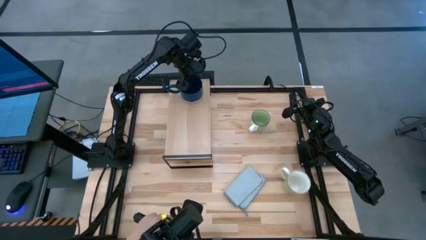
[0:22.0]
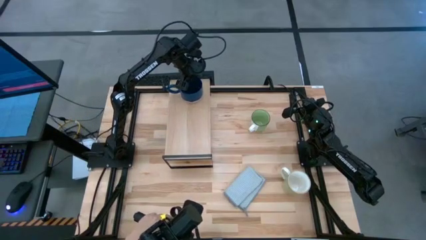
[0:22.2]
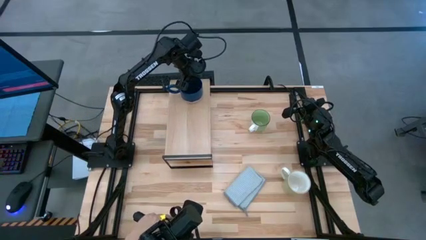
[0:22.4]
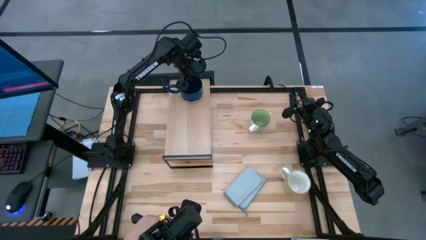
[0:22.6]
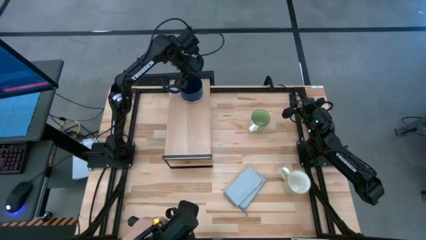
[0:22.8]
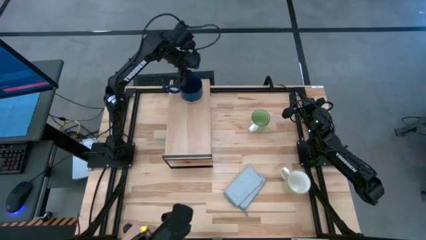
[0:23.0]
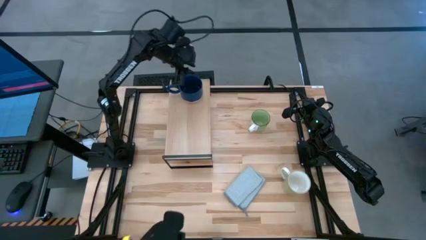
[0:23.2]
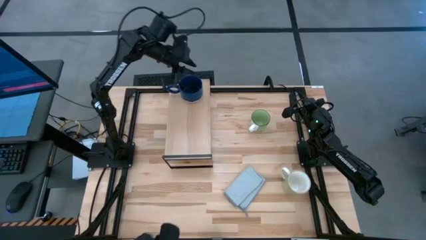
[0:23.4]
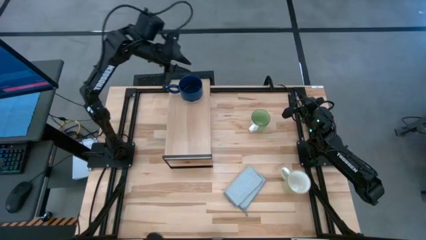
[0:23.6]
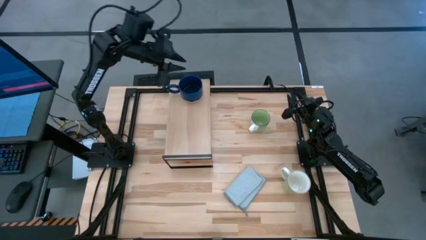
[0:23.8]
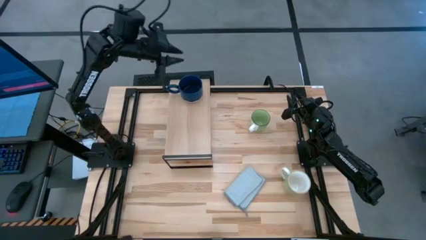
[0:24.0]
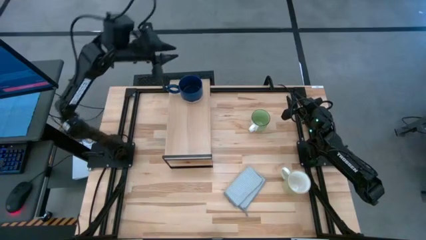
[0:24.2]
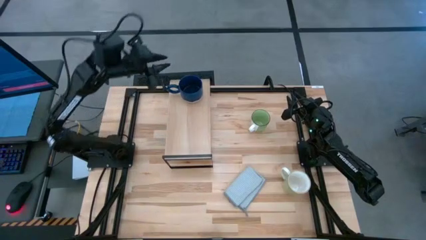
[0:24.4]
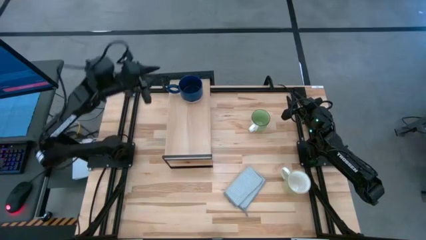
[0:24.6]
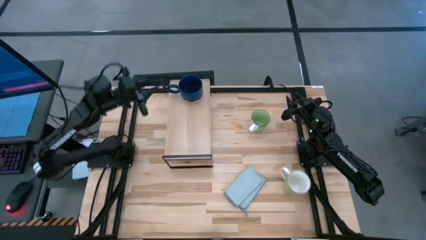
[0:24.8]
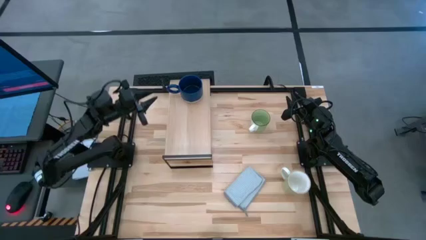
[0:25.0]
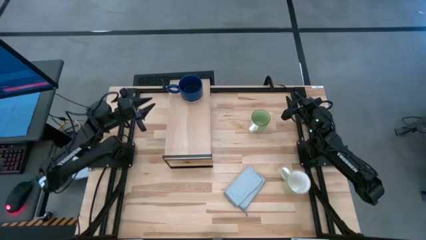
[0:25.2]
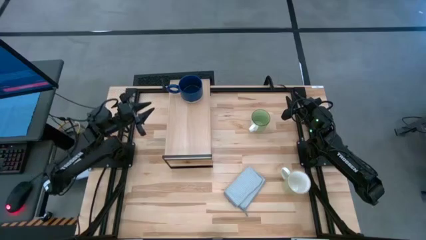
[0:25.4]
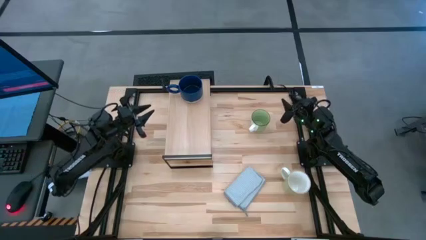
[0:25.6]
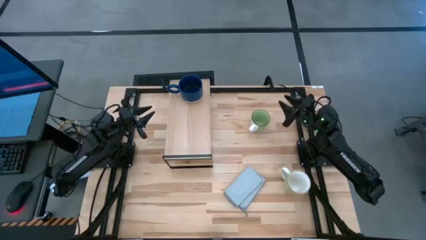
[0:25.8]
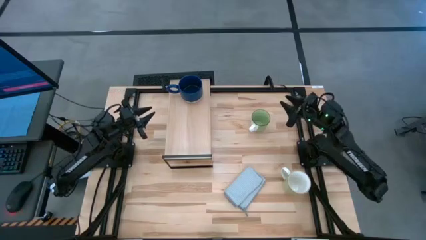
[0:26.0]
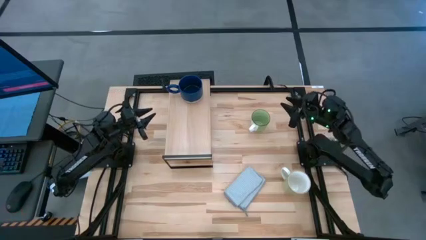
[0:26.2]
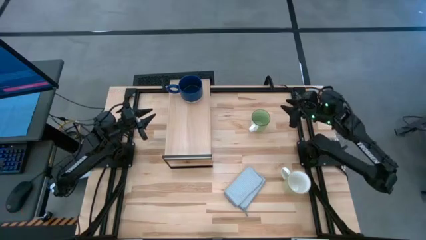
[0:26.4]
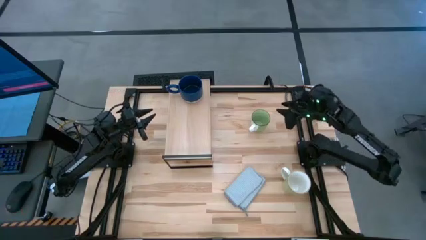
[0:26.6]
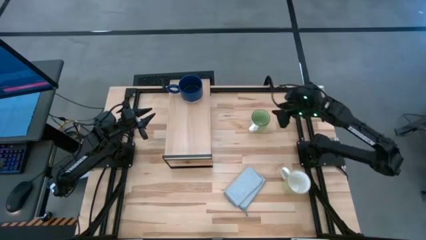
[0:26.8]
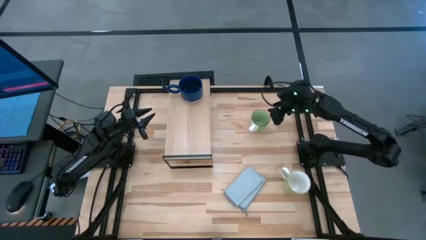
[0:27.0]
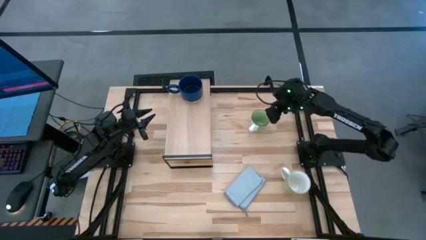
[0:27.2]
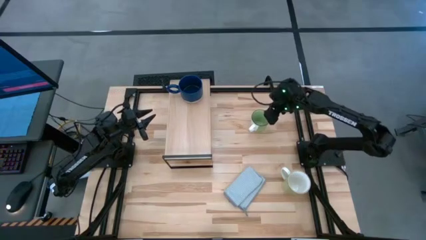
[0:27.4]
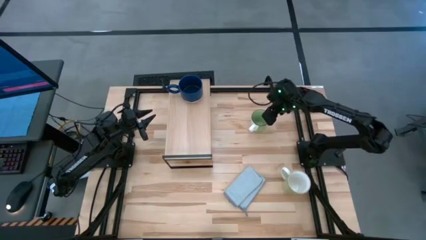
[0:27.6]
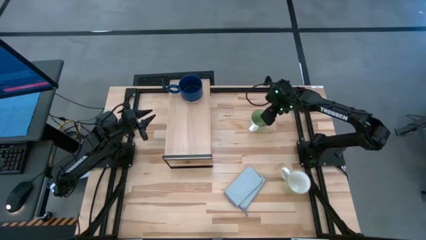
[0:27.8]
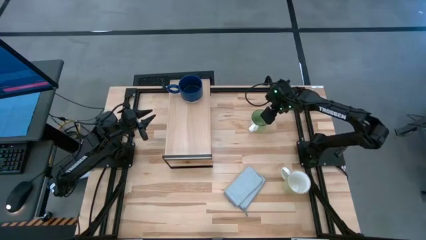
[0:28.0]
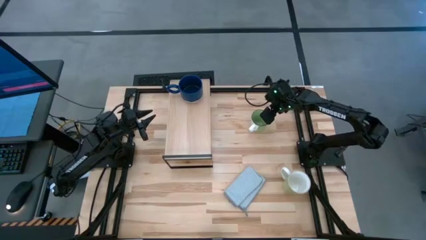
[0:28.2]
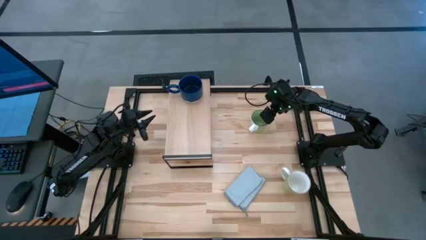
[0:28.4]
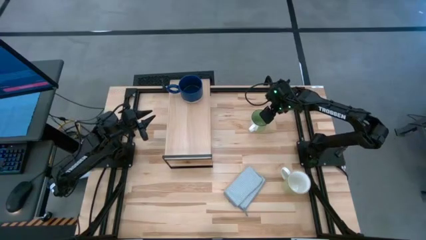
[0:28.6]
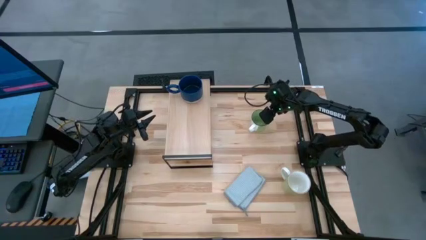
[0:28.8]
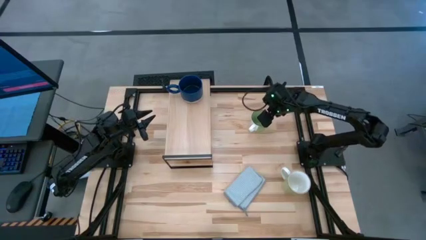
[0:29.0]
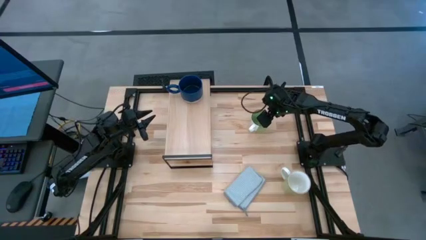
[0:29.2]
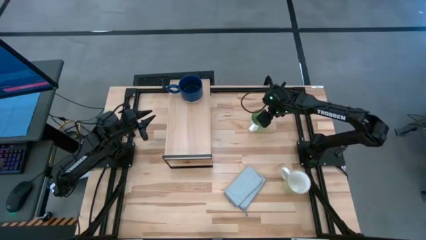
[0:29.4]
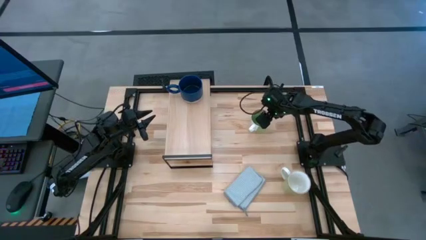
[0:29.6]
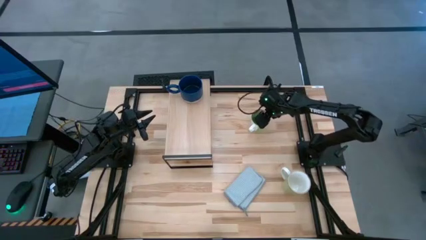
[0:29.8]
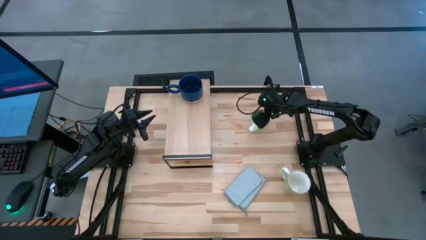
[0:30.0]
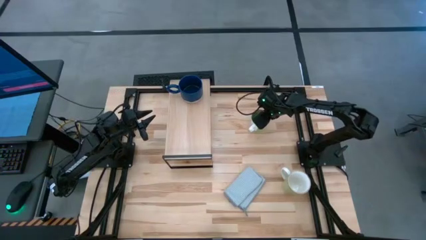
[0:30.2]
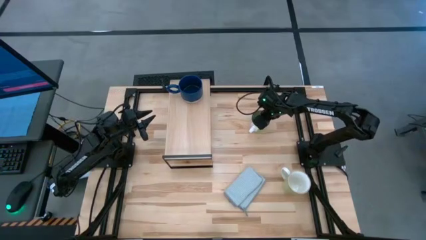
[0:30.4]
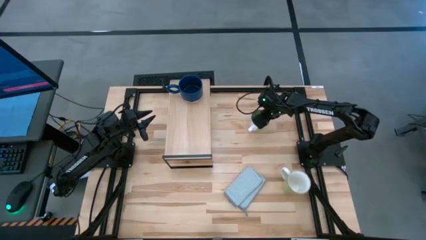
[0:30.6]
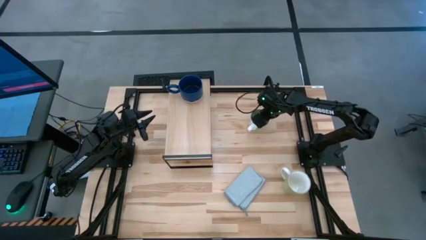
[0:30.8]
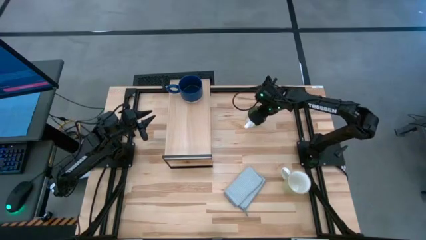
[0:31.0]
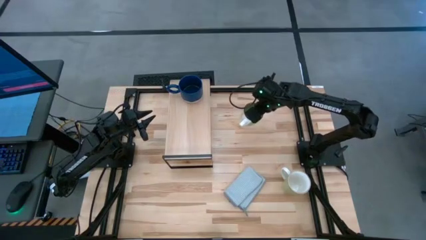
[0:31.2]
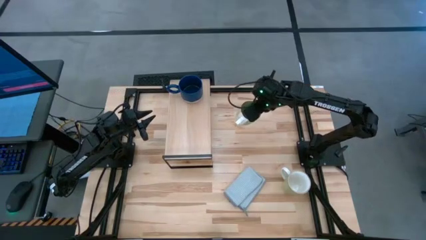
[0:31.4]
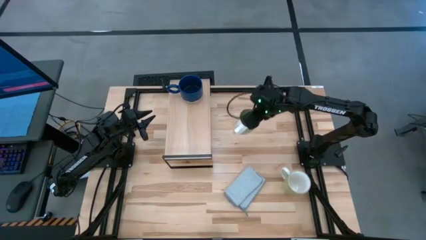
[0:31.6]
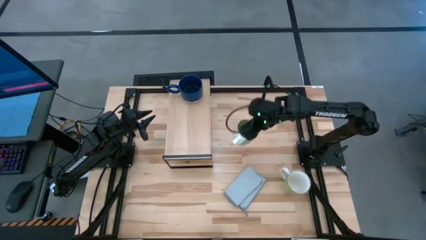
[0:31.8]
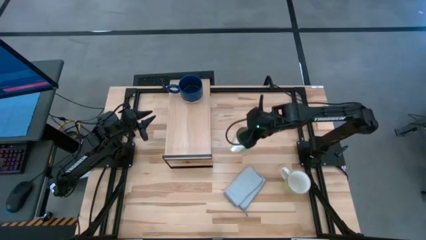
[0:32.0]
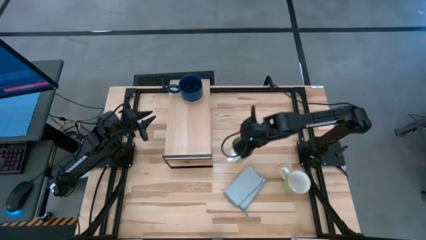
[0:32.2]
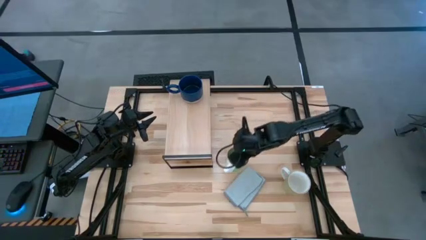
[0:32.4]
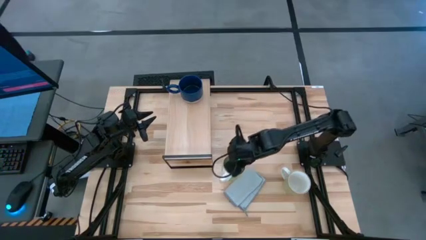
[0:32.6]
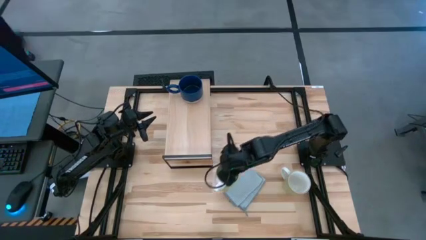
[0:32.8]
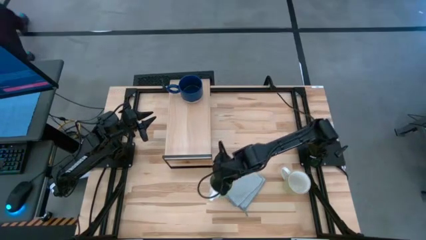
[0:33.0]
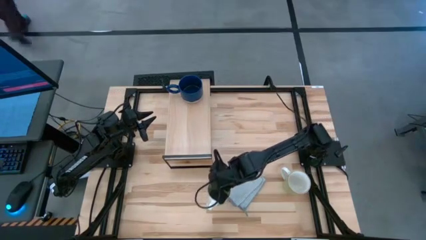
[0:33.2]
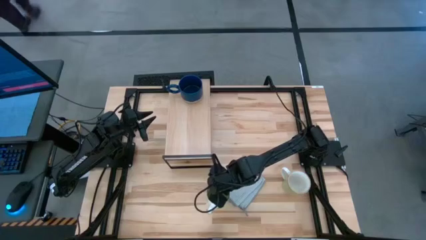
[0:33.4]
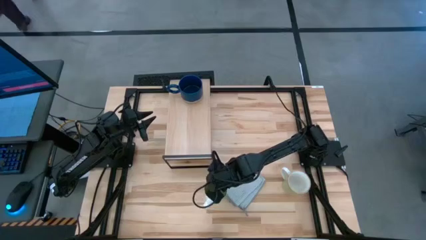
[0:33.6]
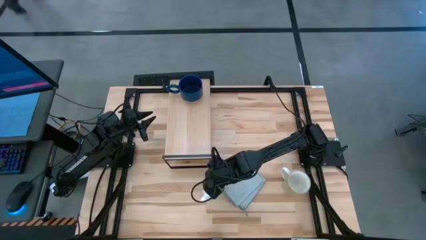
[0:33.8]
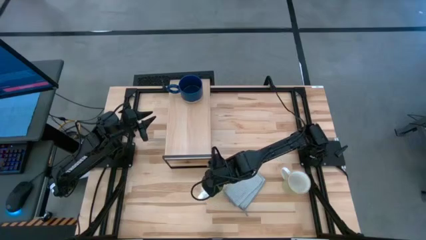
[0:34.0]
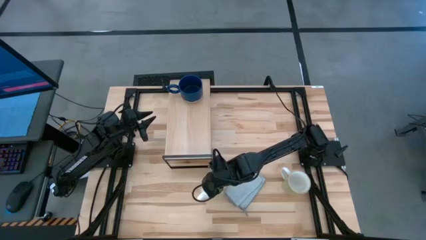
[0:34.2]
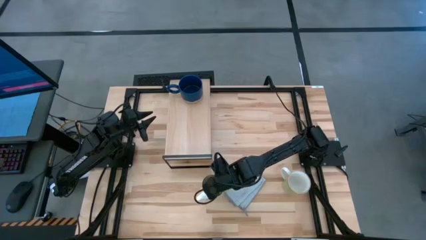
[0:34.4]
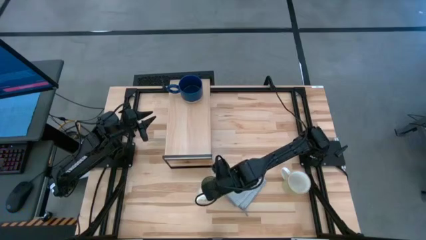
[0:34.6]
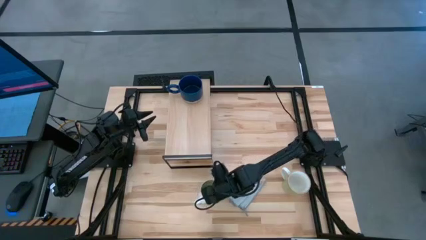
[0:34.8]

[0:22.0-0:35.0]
Task: Stack small to large cups/mugs on shelf
Put the white green mug on the shelf

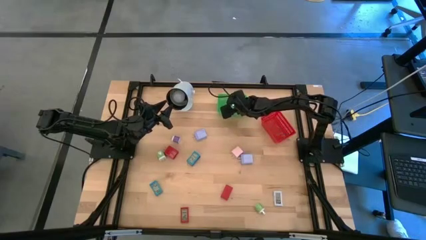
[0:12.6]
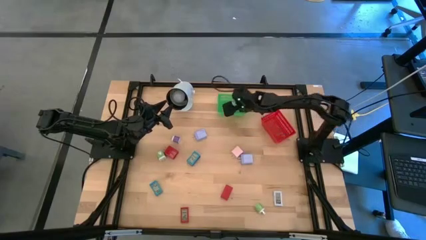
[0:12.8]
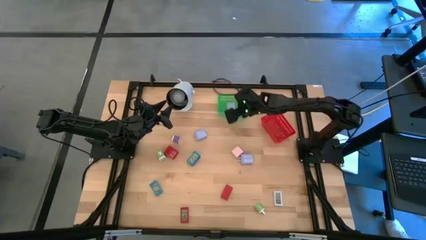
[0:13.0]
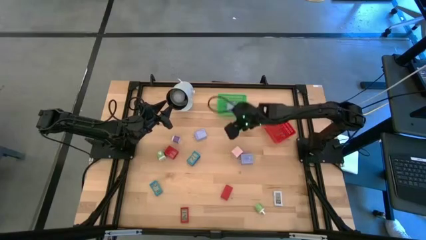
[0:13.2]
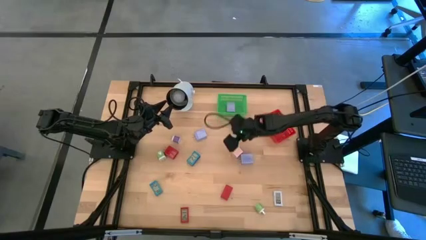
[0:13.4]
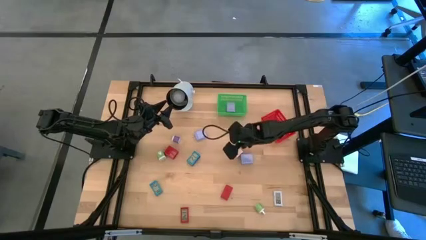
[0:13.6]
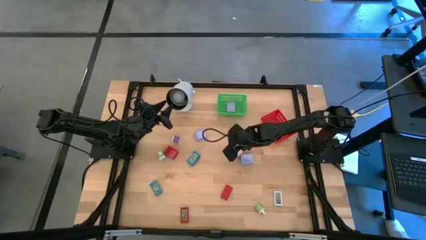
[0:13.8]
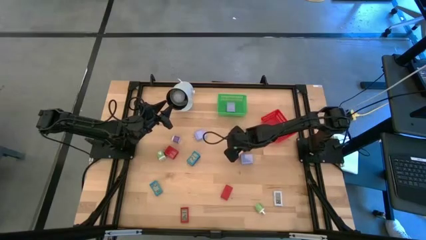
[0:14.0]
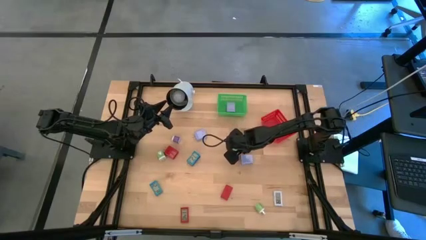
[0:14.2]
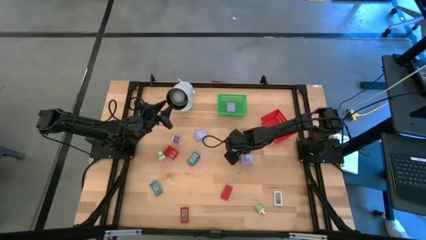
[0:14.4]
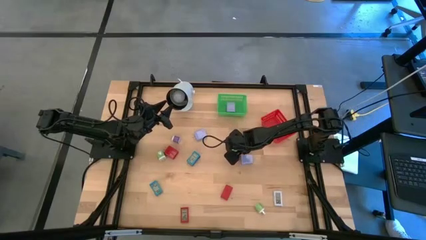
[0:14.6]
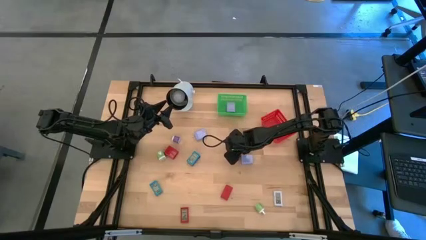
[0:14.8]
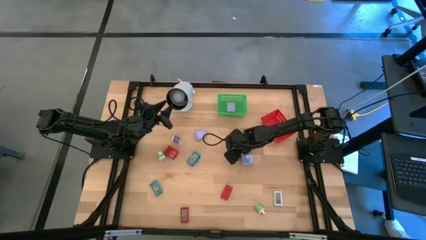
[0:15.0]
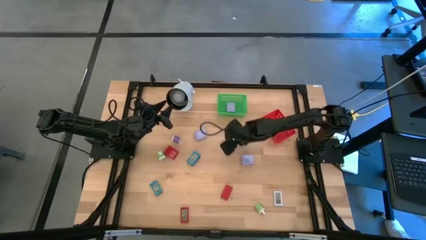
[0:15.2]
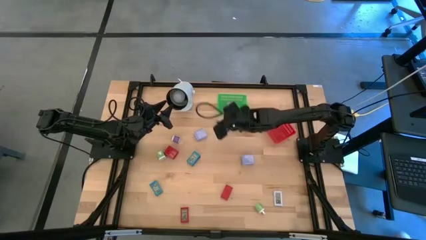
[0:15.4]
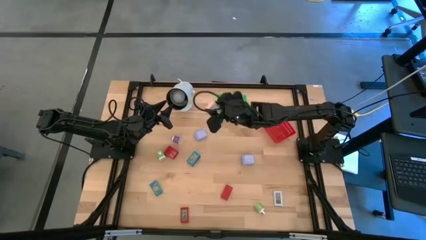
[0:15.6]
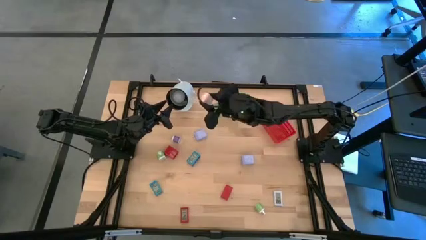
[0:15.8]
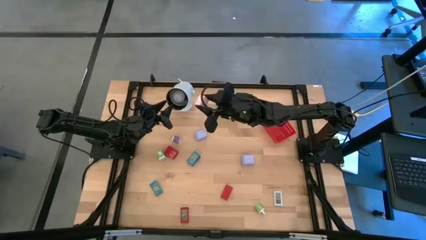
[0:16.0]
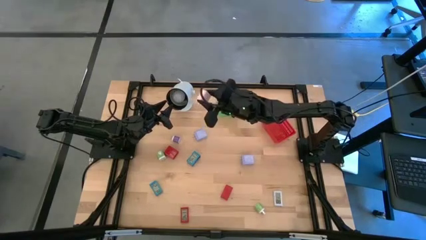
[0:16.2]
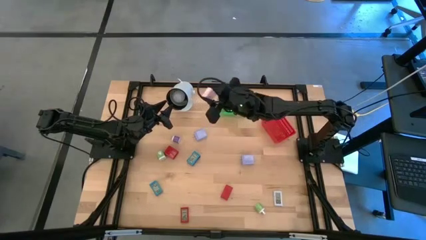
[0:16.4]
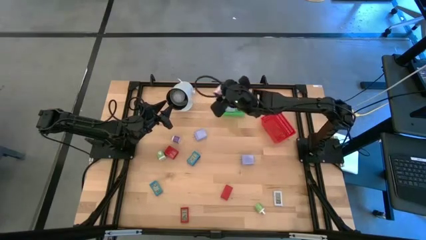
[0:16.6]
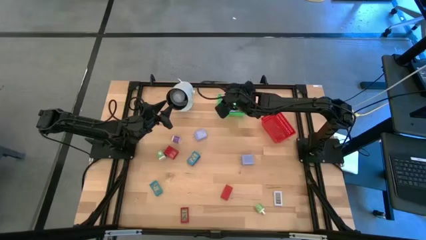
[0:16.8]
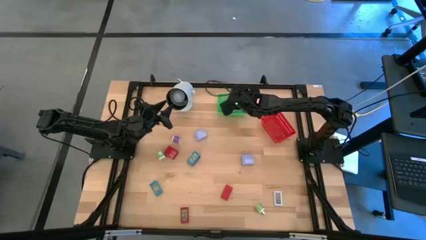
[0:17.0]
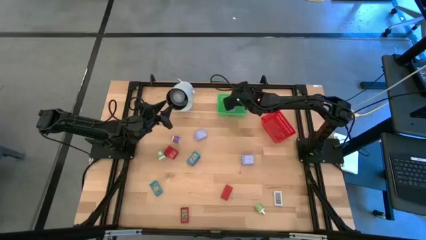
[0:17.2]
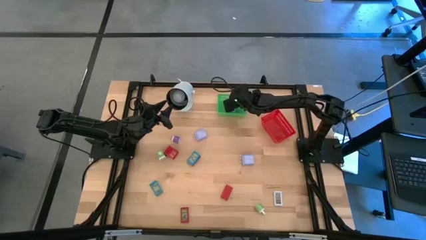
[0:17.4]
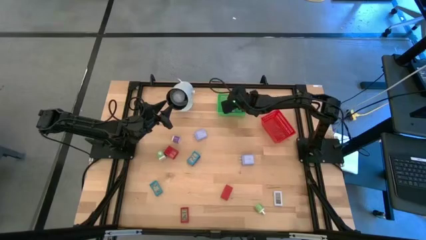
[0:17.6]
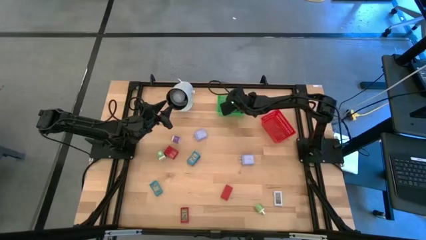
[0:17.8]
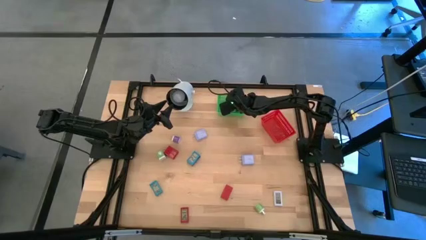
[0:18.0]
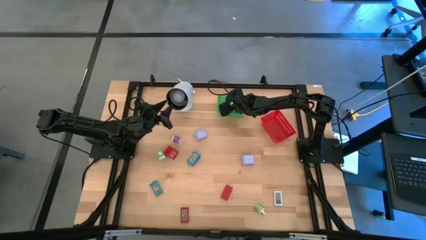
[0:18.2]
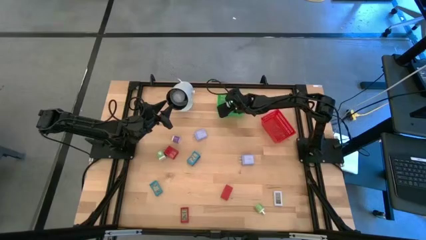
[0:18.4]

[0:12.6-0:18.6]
Task: Pick & Place Office items
Put the pink charger adapter into the green bin
